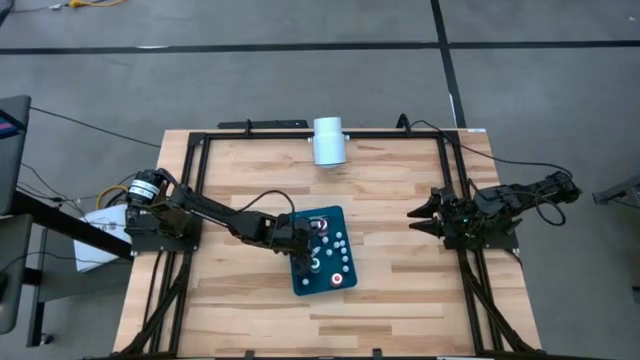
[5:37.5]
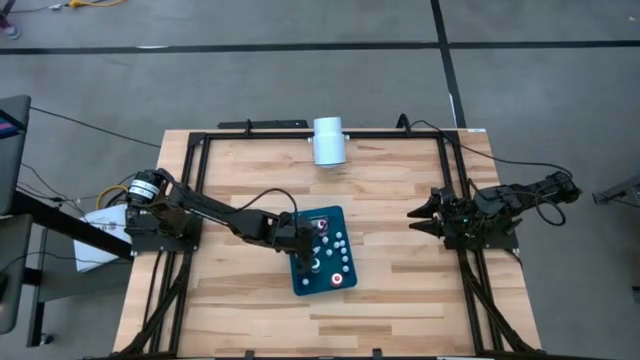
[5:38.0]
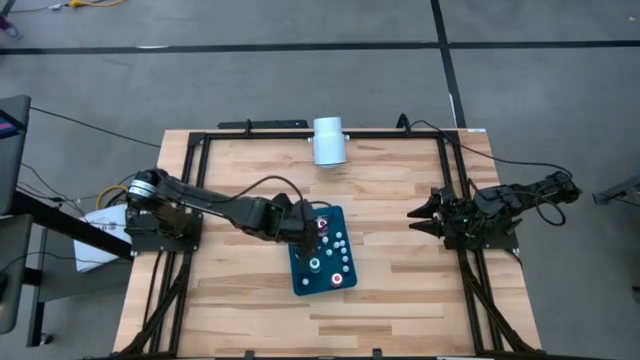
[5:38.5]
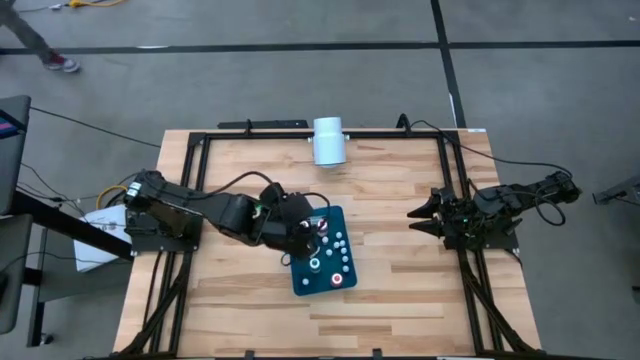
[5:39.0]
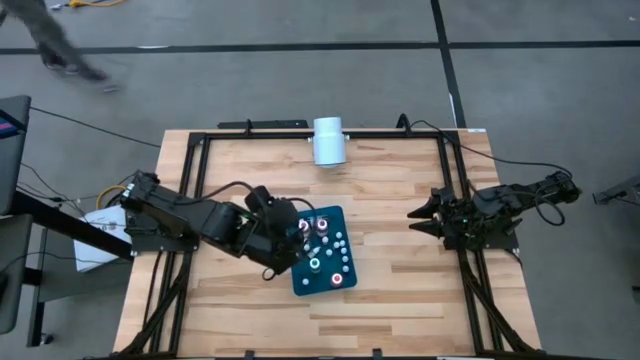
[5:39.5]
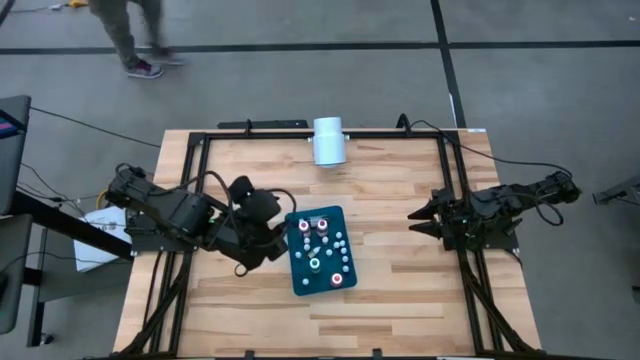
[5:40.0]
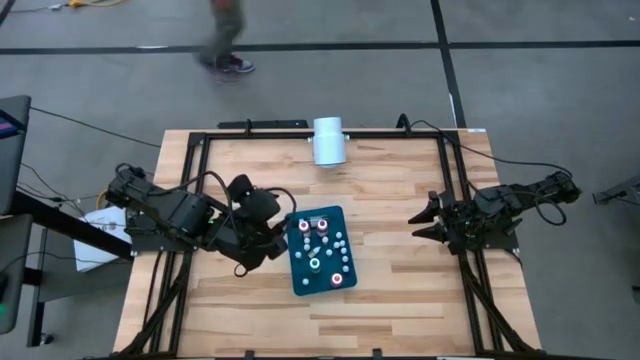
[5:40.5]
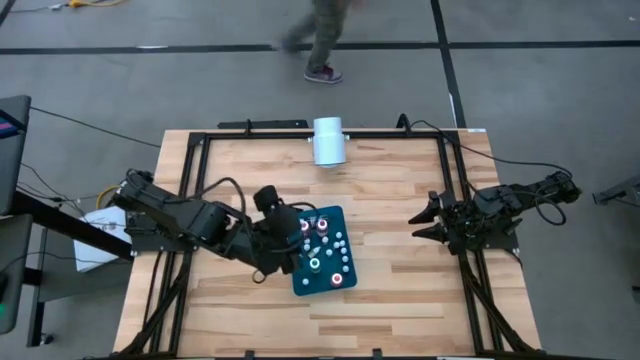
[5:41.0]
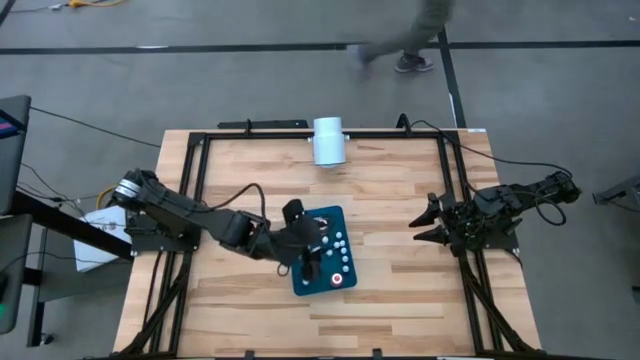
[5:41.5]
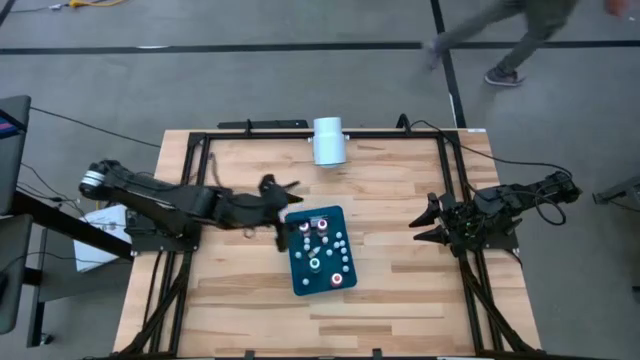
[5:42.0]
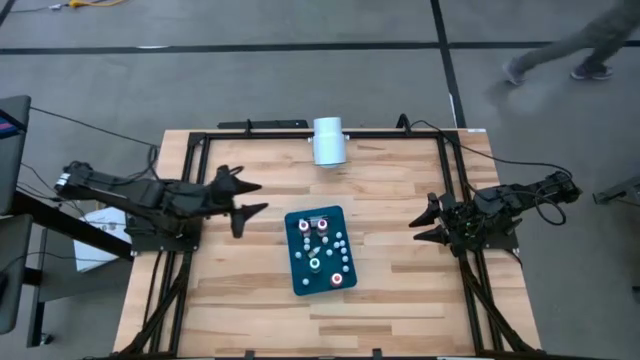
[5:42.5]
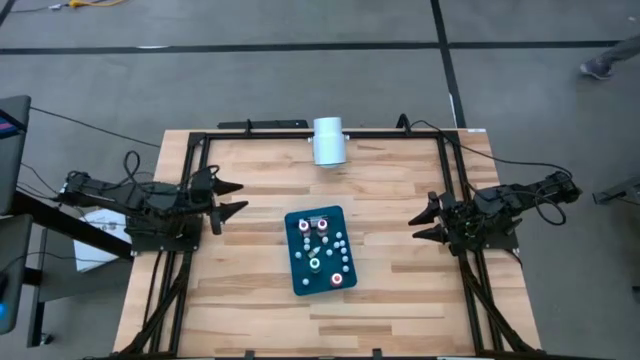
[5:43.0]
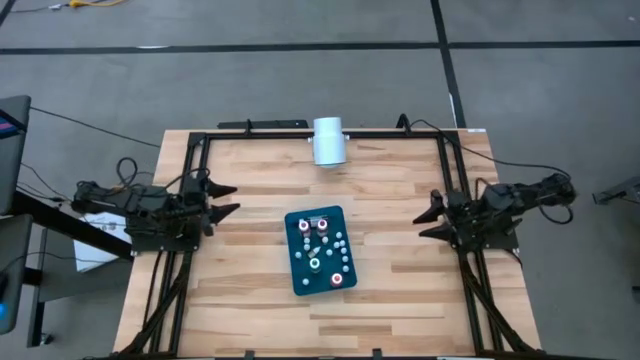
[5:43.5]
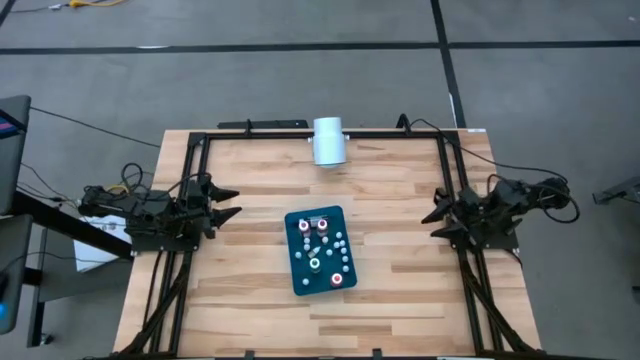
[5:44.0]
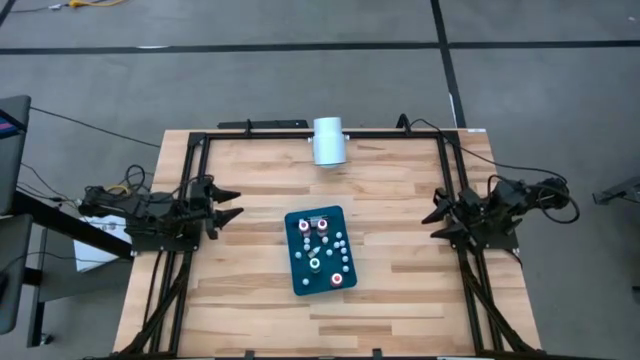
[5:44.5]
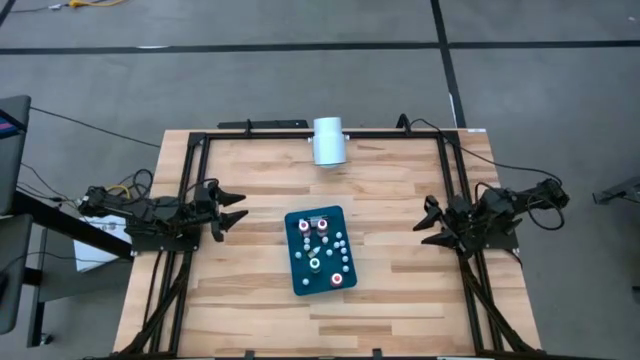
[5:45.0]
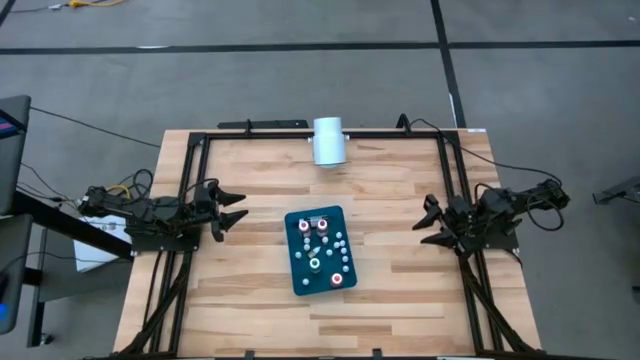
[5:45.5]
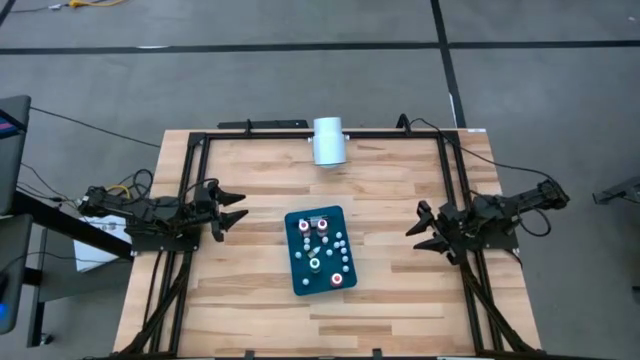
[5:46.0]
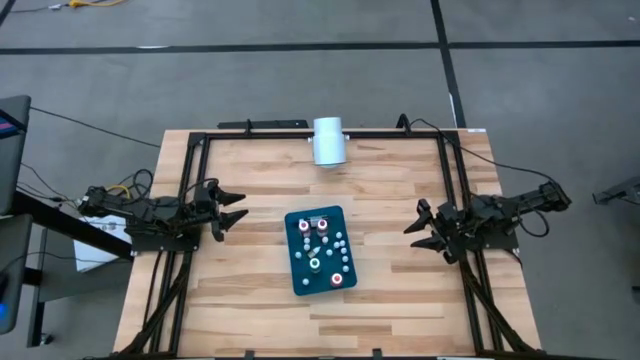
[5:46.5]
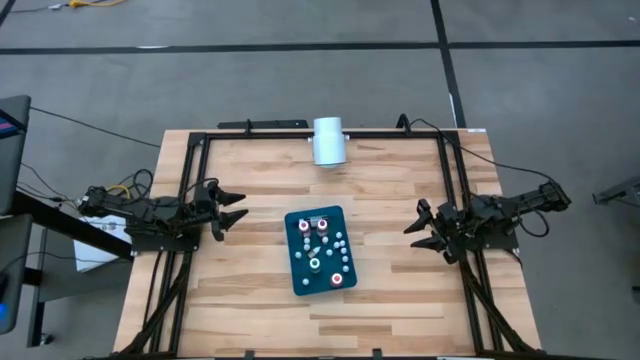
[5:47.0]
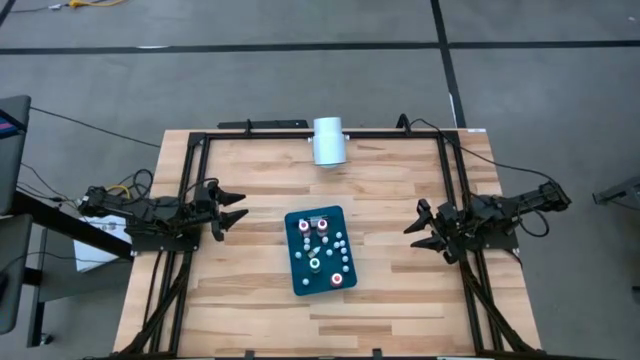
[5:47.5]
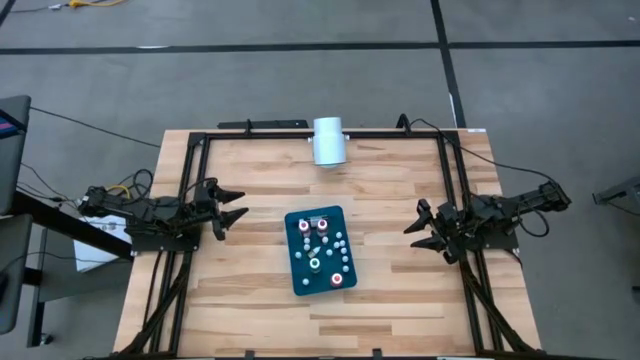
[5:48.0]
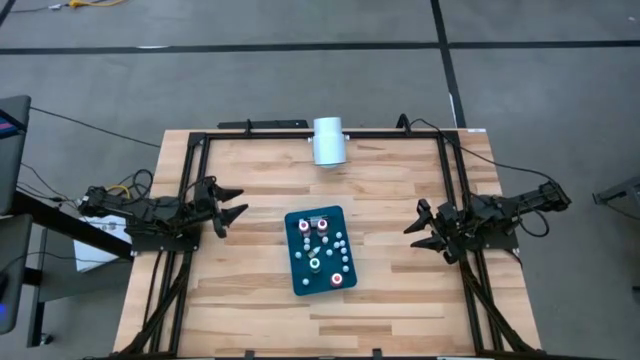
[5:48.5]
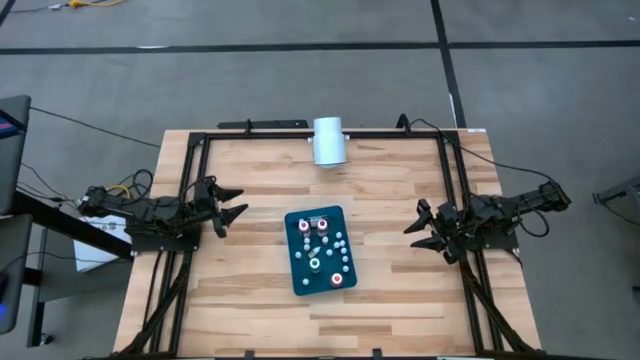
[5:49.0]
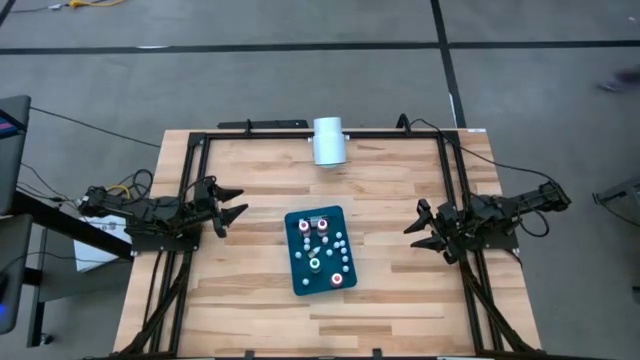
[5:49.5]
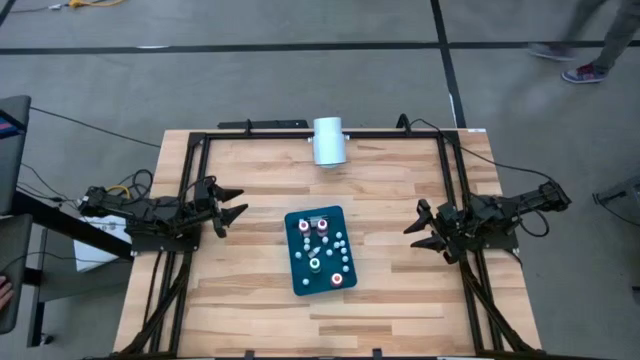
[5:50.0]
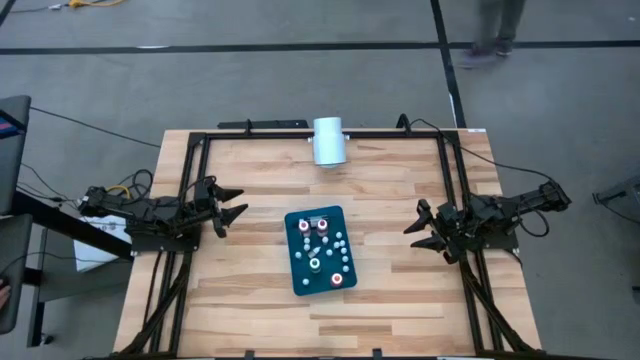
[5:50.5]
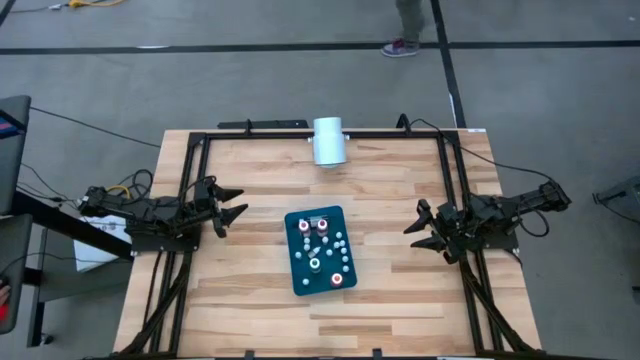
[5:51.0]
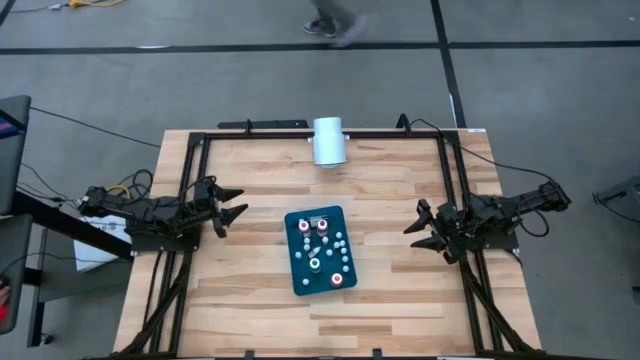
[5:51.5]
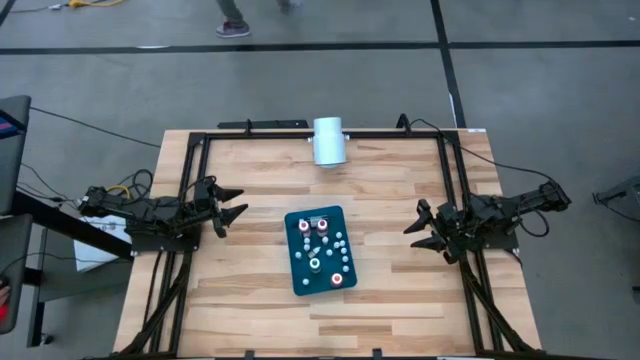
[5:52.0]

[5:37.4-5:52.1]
Task: Pick & Place food coloring
Return to Home Position

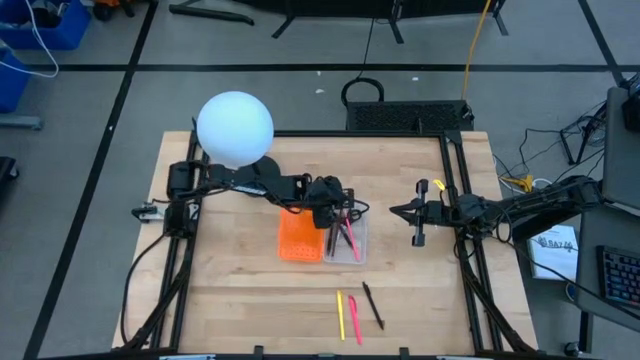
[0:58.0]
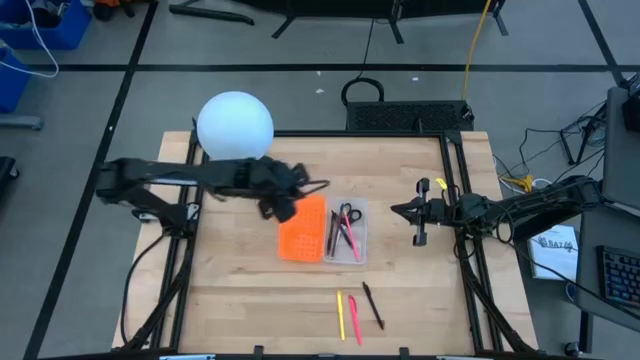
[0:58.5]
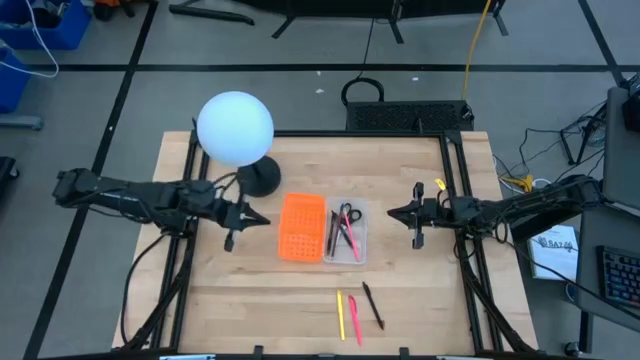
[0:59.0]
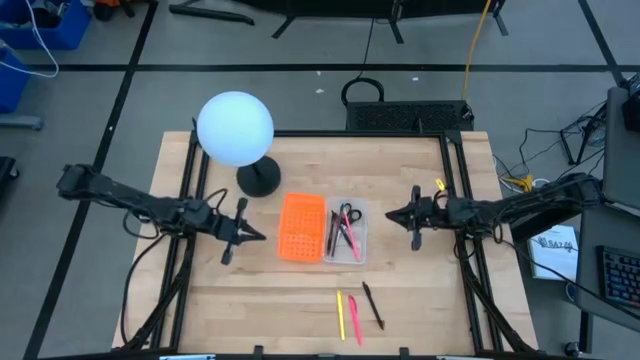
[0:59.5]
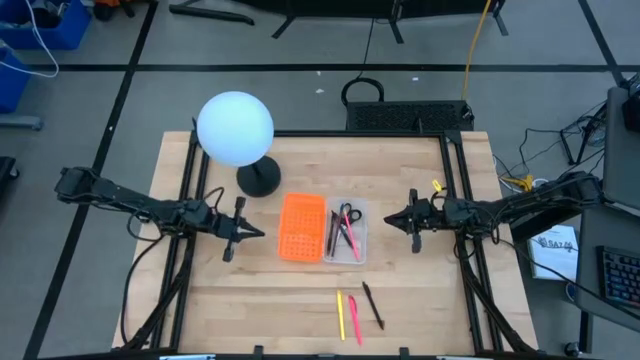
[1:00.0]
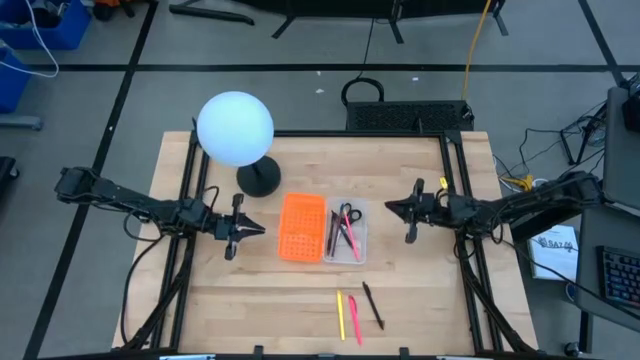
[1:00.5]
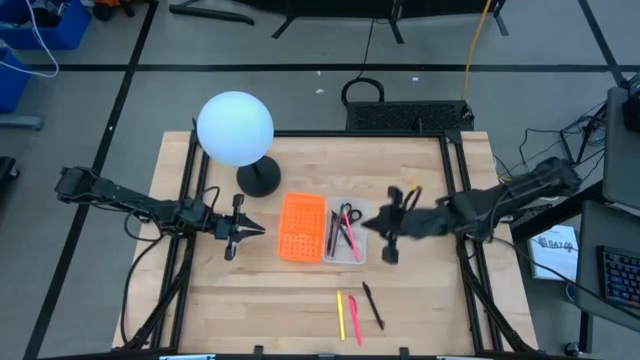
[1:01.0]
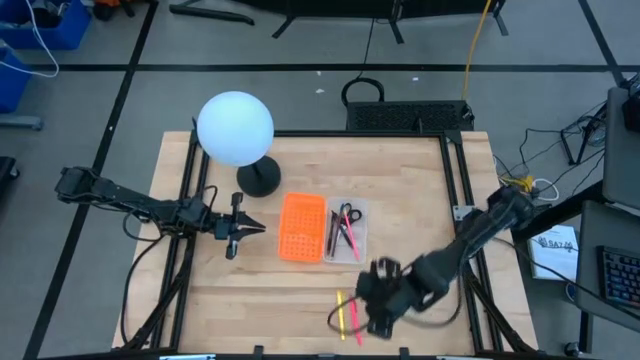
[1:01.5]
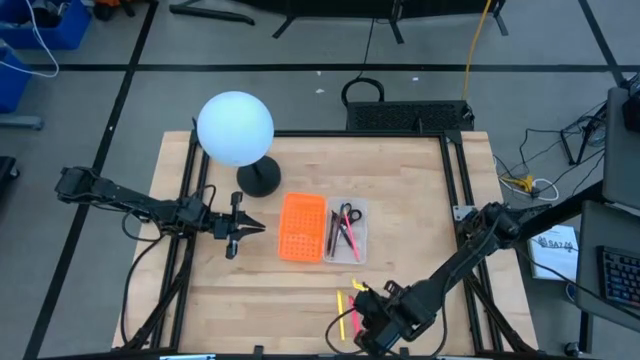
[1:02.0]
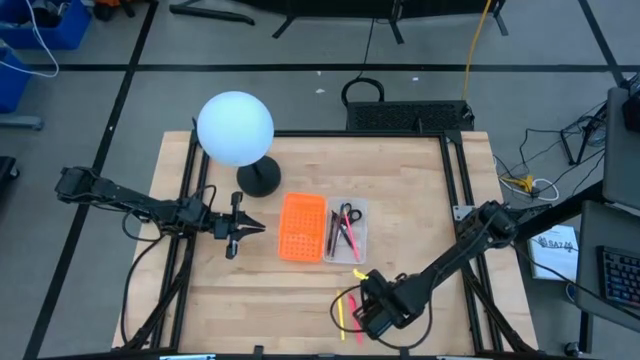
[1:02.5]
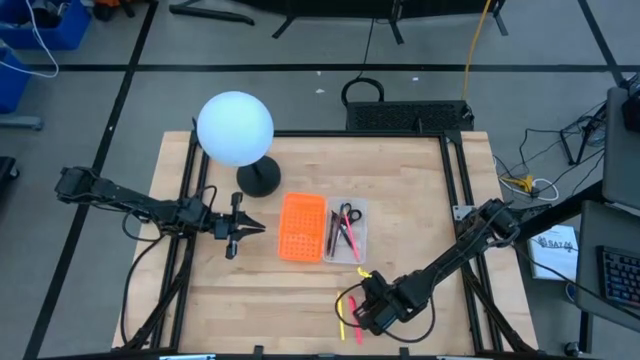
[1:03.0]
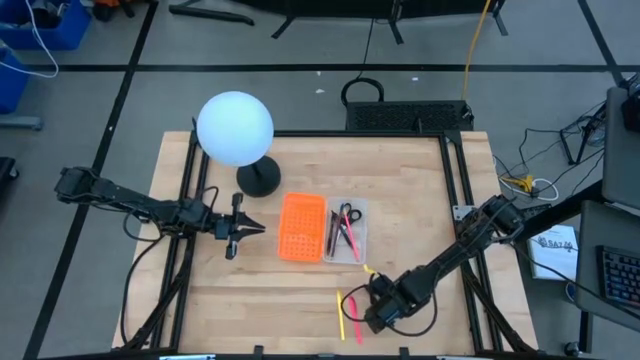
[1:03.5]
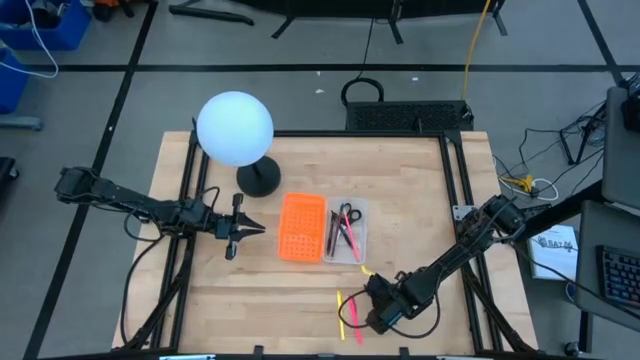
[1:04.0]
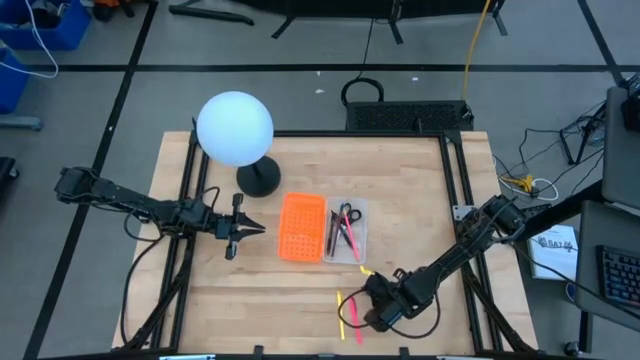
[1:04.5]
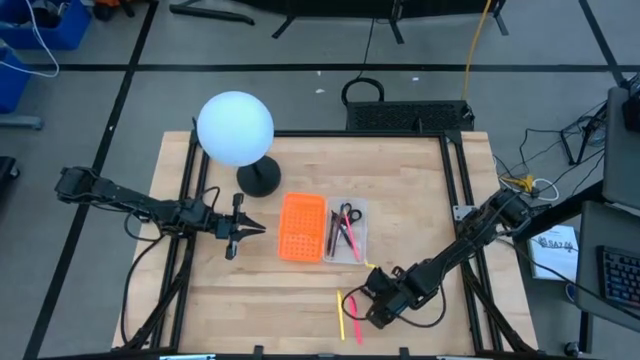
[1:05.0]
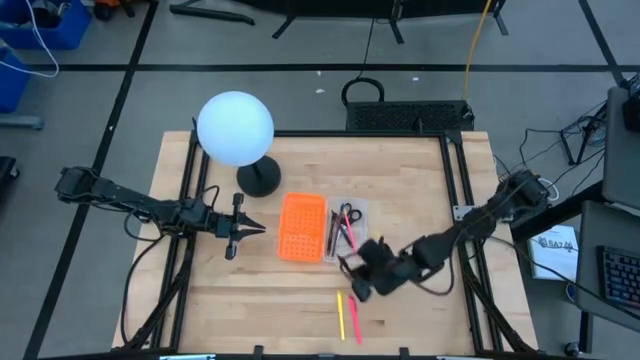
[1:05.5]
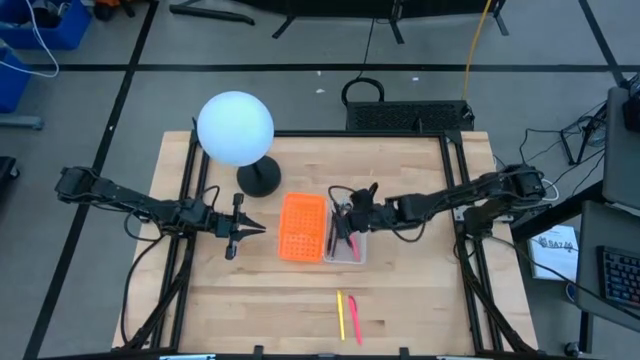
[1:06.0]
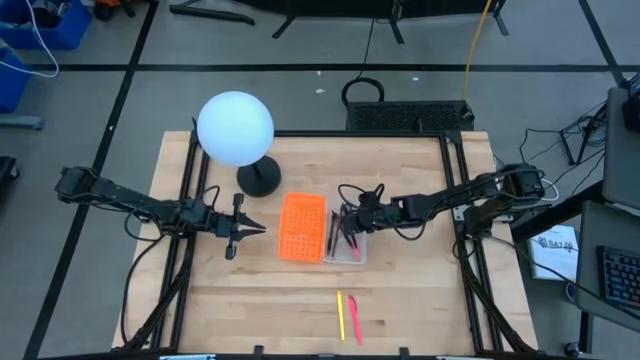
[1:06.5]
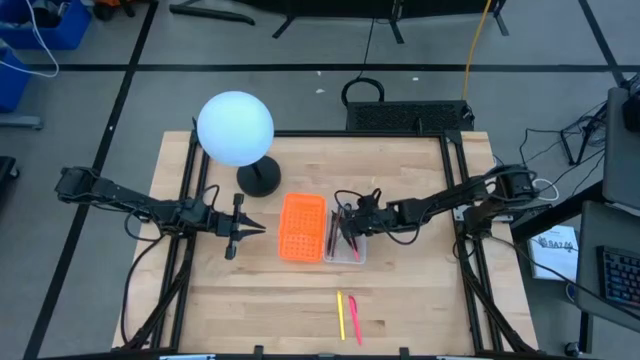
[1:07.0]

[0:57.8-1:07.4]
Task: Pick & place school supplies into a supply box
Put the black pen into the orange supply box
